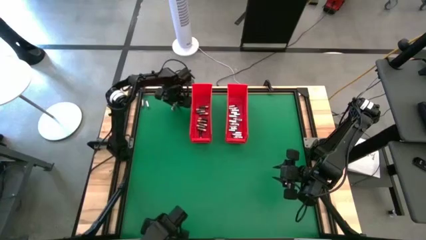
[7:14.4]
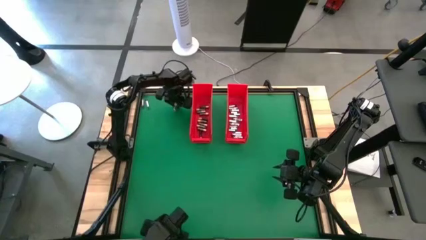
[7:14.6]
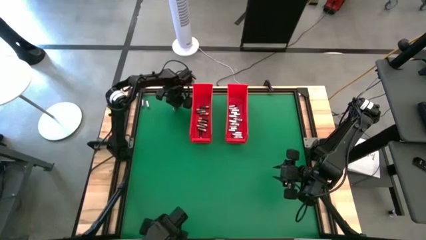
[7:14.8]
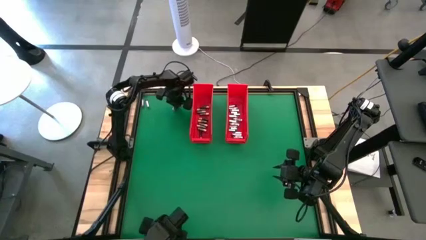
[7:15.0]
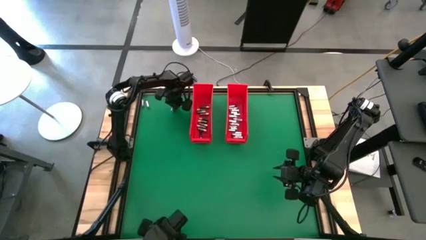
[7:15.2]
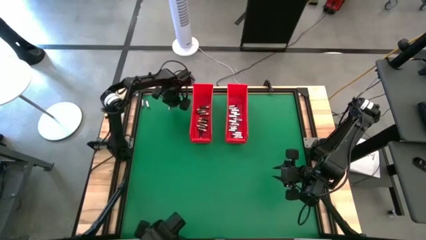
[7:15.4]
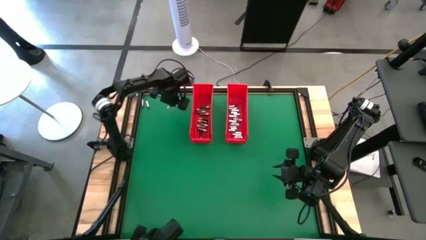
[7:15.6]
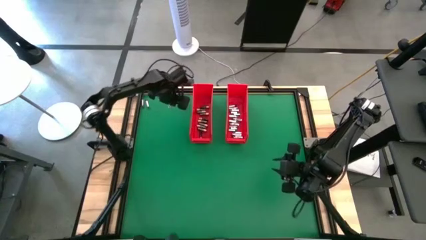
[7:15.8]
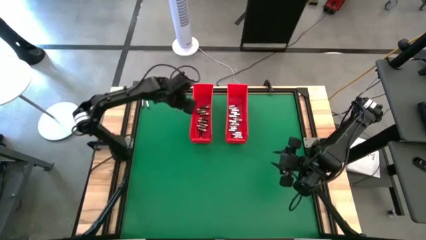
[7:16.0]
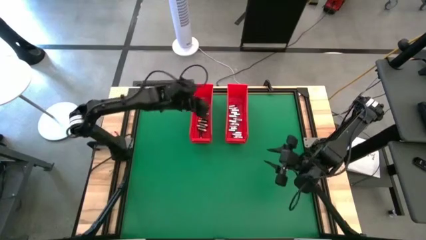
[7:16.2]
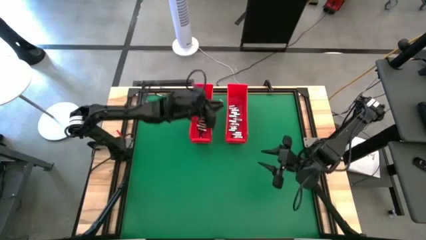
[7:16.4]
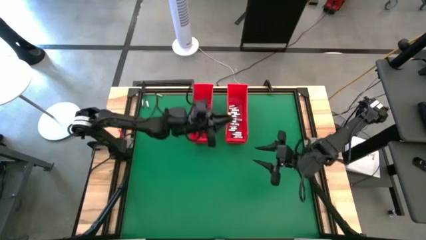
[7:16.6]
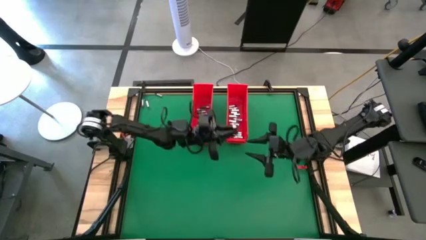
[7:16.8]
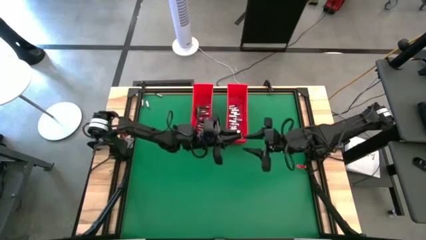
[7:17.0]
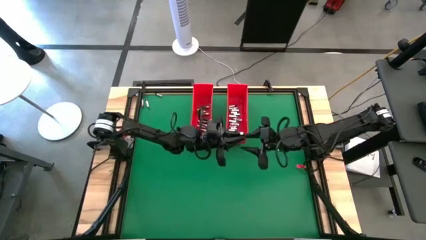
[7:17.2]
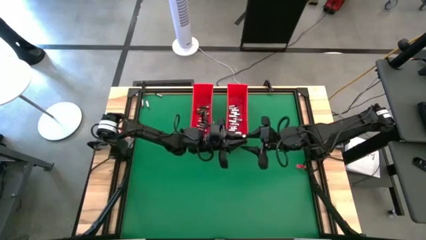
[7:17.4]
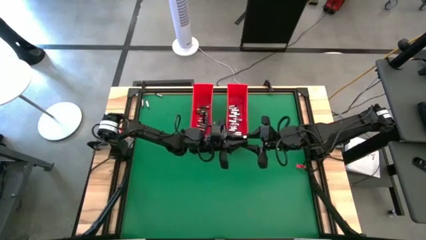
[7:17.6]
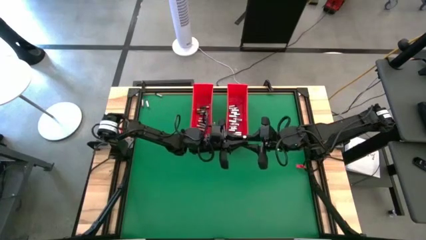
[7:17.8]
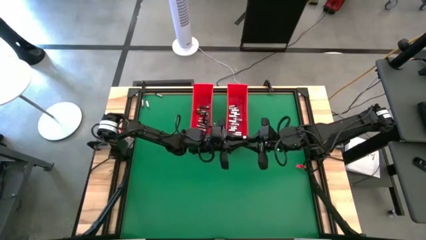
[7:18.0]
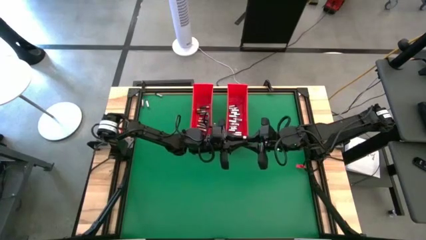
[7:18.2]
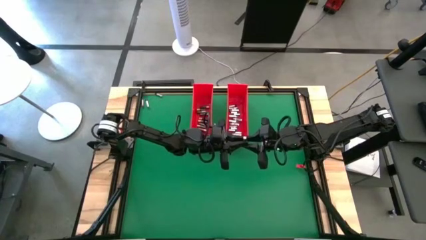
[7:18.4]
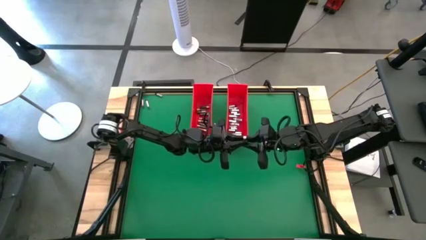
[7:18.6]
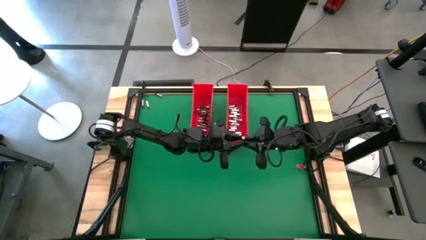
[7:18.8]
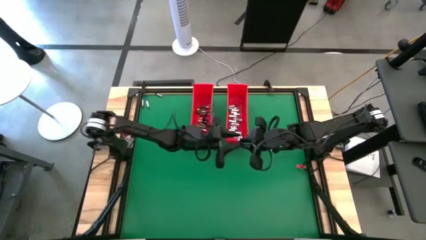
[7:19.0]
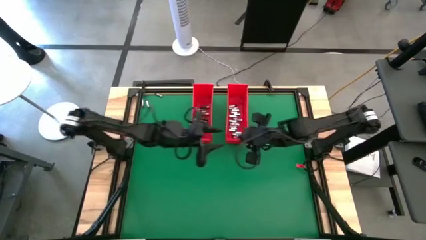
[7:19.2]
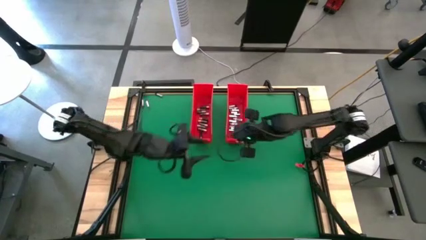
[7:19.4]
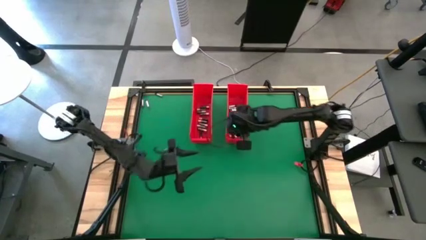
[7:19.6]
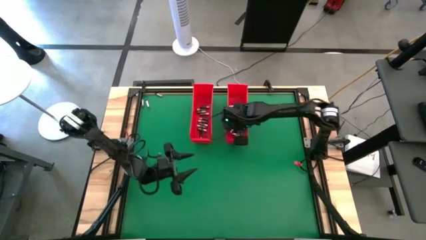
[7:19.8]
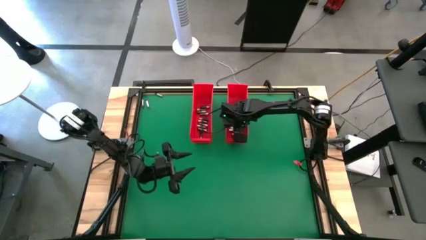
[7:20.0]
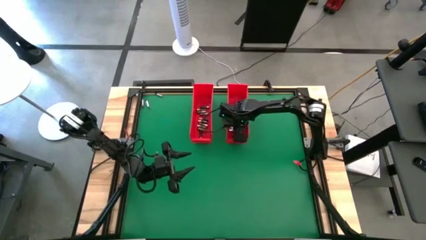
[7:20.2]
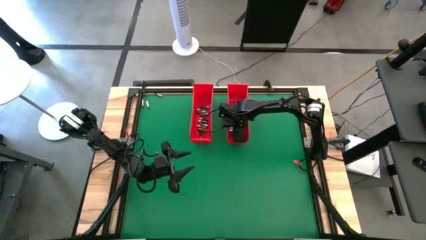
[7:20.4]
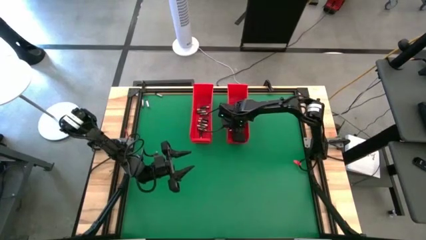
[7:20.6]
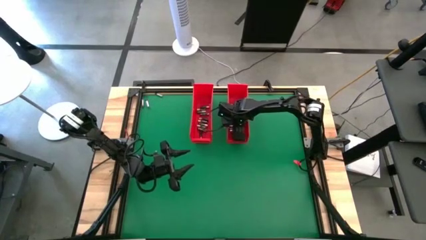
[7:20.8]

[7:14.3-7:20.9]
Task: Sort batteries
Put the silver battery into the right red bin

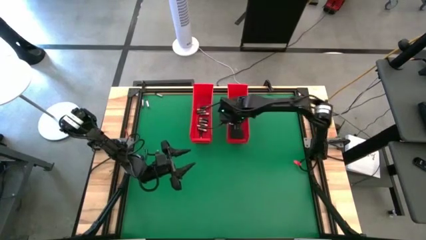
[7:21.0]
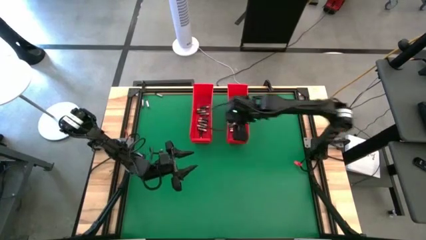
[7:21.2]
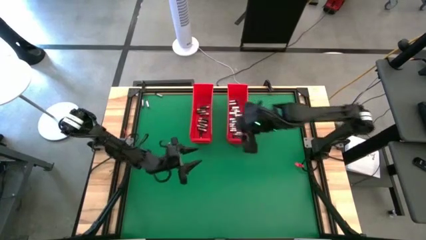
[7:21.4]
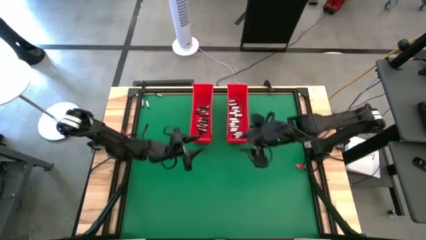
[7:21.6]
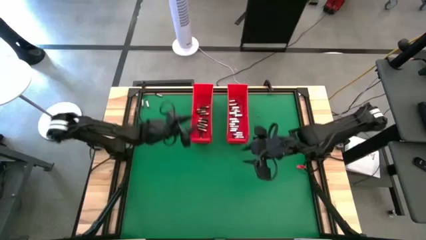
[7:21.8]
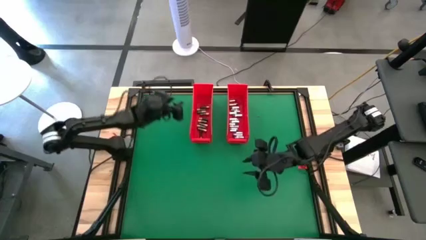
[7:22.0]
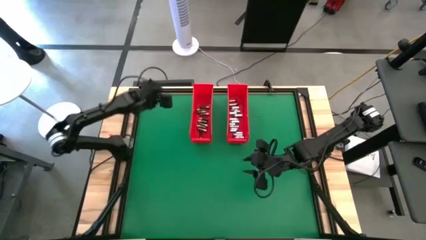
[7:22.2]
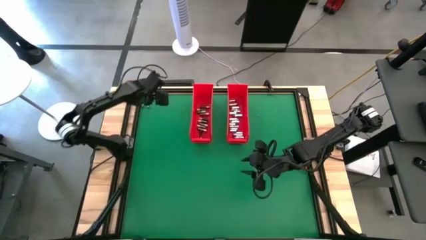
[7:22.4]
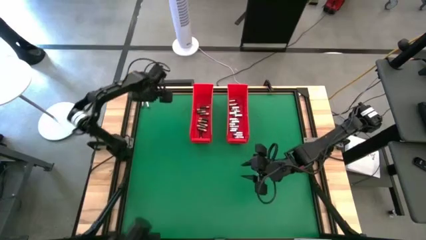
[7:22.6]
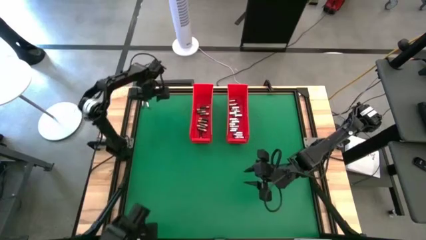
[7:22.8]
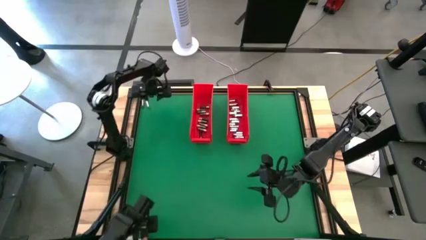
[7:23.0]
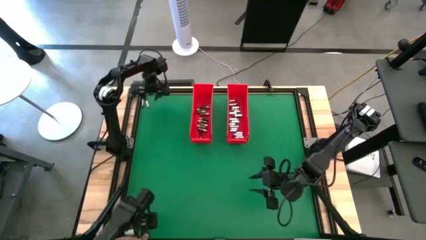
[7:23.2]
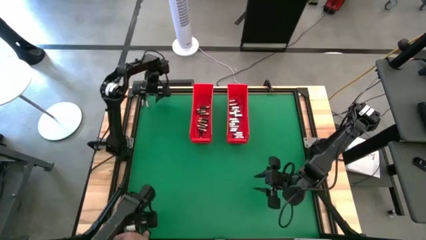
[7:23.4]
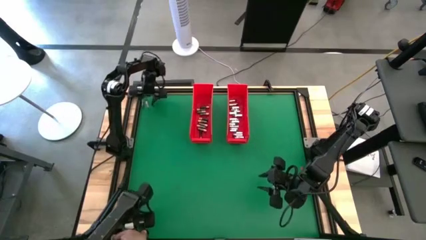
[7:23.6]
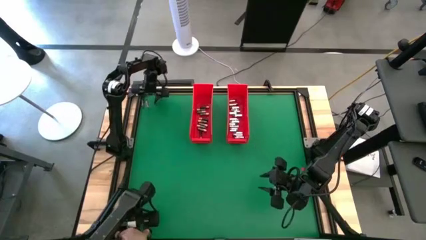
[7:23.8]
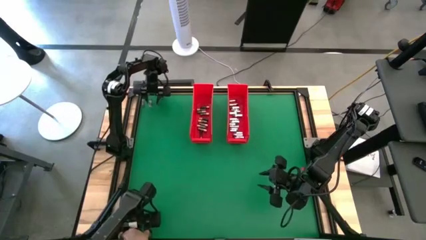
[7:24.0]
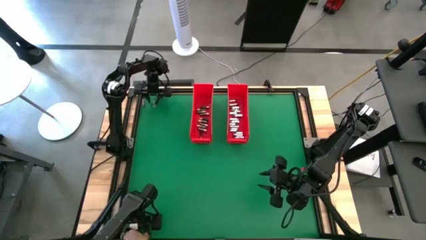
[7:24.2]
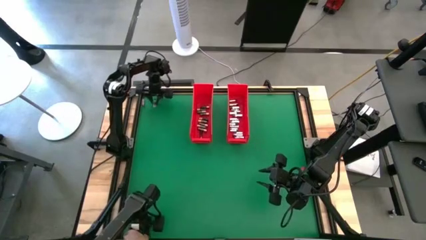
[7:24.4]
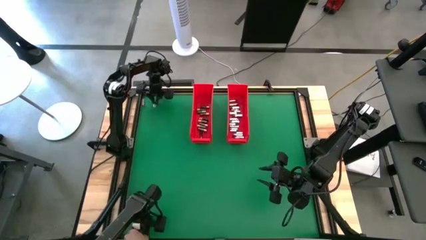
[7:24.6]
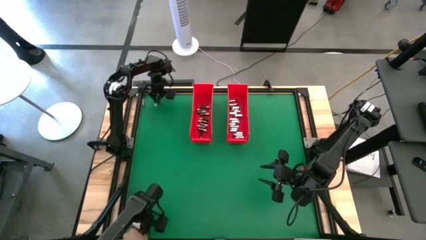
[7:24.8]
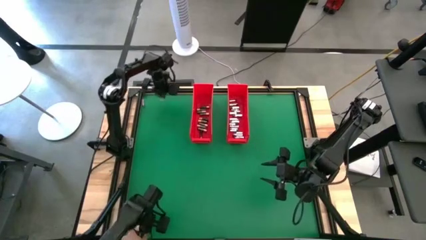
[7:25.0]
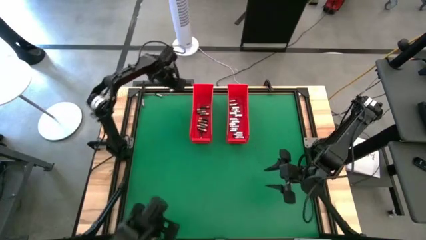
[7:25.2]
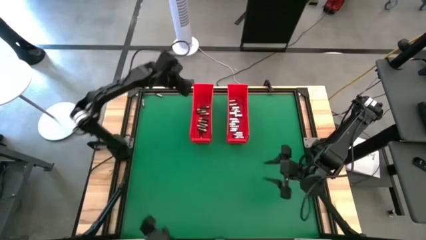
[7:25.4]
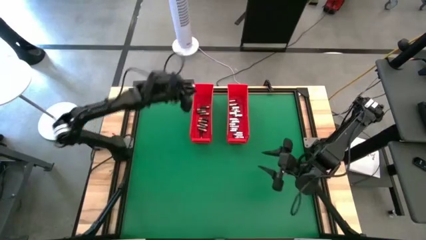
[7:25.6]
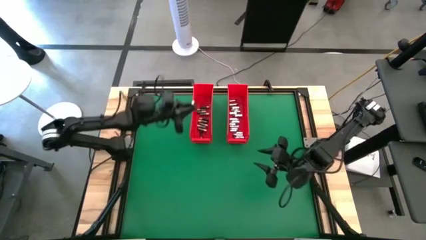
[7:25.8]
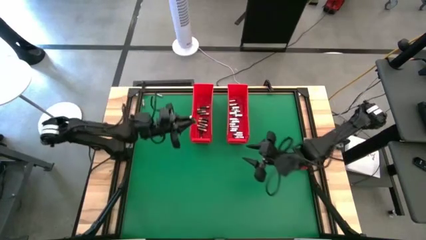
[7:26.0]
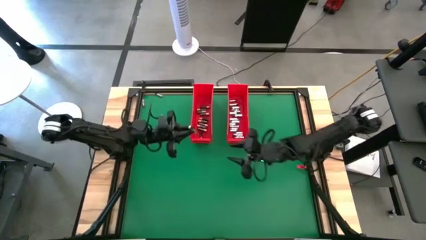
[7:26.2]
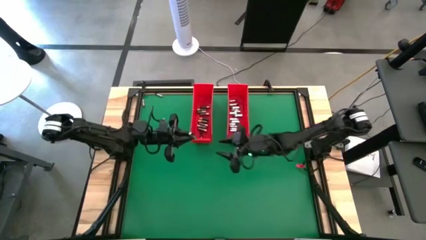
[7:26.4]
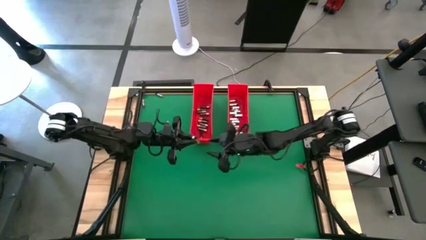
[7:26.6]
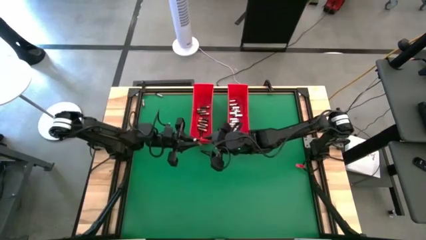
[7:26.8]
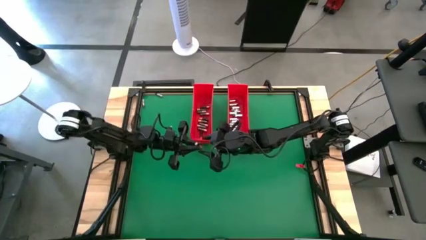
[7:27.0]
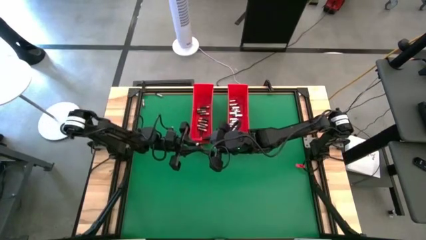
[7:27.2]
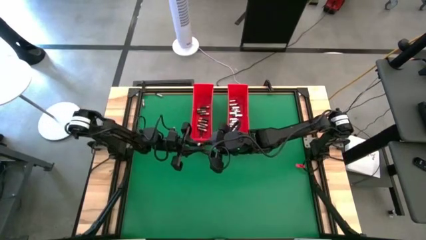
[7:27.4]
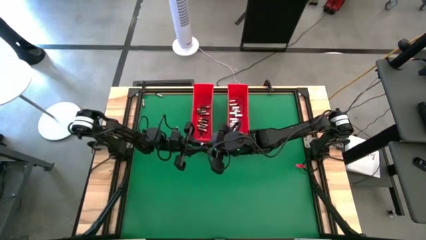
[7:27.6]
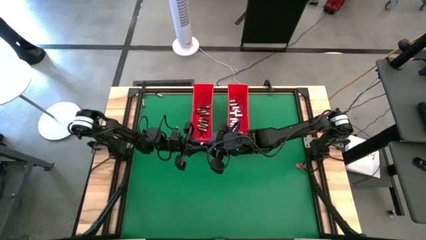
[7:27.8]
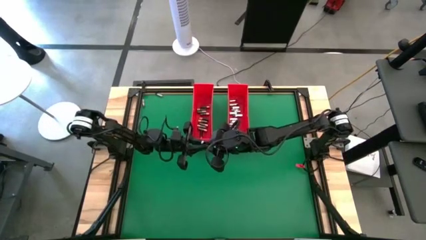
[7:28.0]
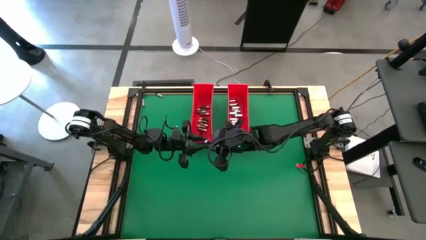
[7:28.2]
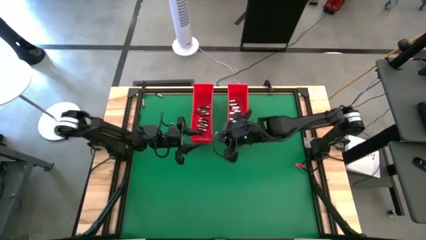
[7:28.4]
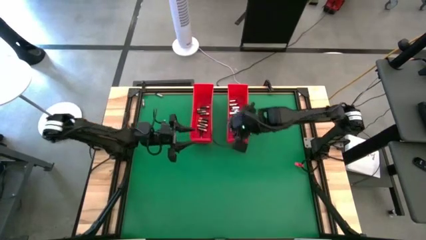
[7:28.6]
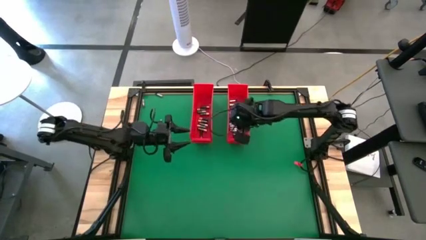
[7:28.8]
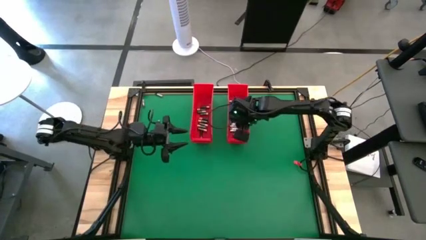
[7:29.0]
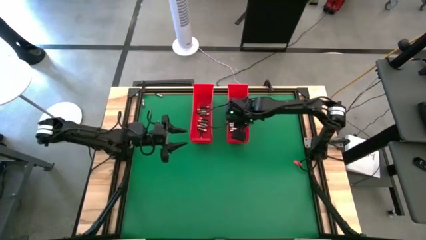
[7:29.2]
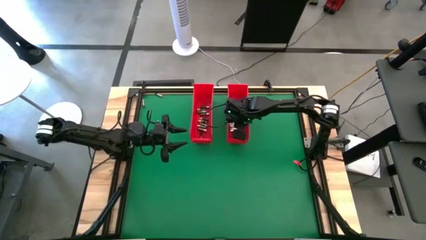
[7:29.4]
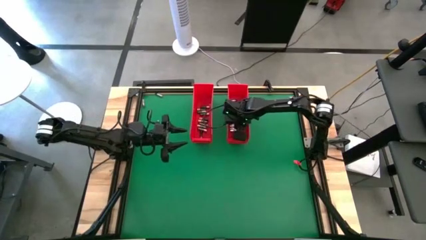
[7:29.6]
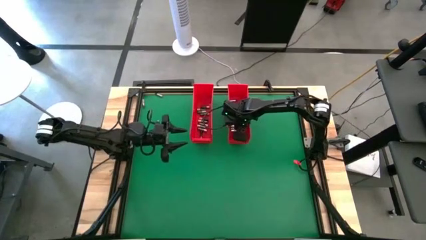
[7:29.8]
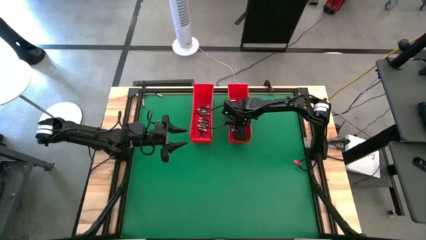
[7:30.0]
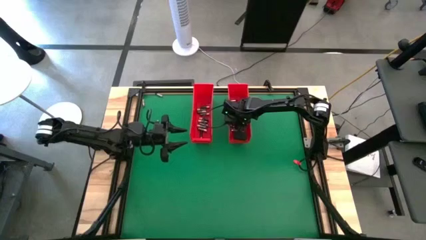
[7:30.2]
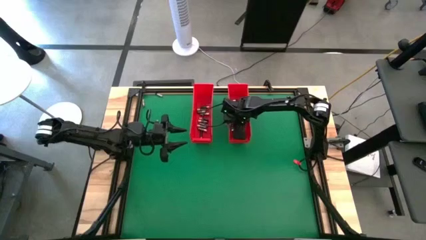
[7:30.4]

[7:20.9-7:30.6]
Put the silver battery into the right red bin
